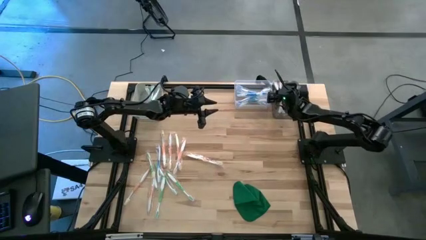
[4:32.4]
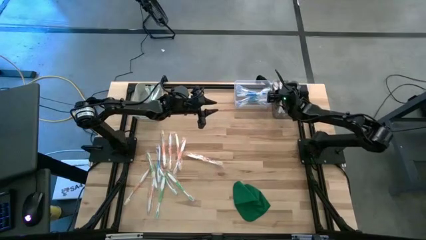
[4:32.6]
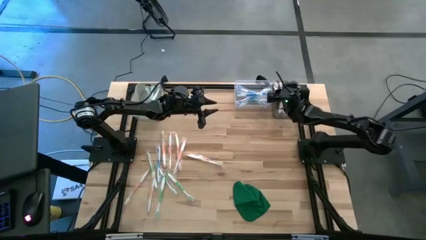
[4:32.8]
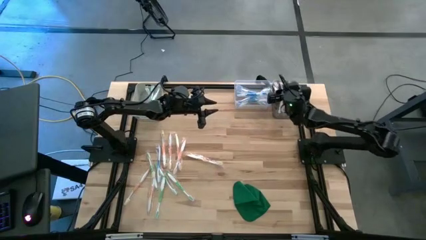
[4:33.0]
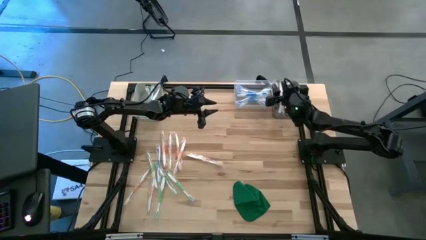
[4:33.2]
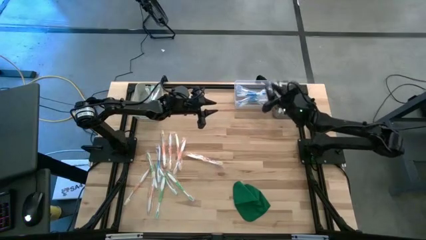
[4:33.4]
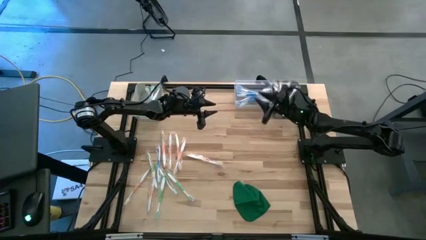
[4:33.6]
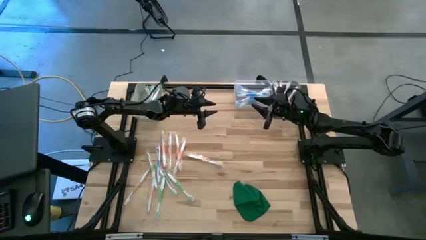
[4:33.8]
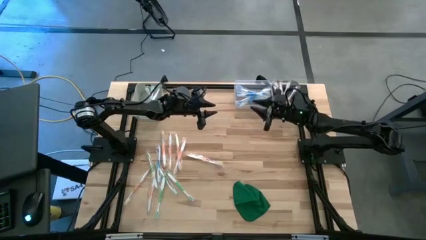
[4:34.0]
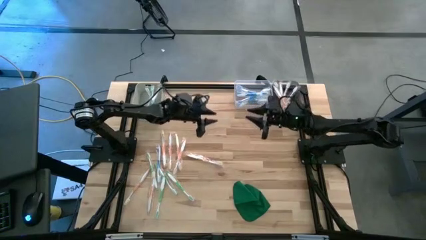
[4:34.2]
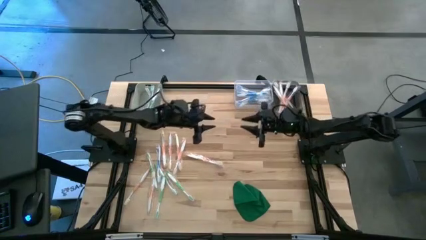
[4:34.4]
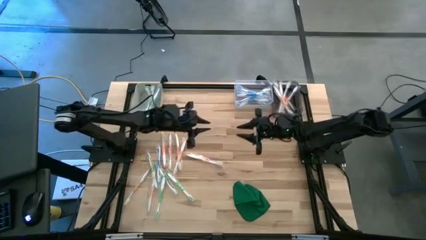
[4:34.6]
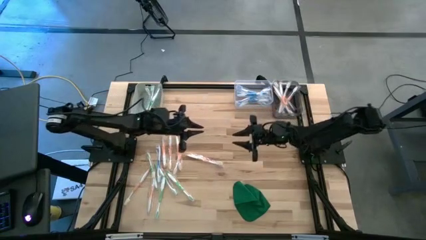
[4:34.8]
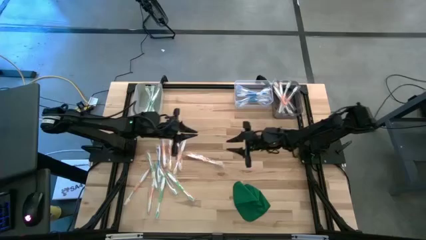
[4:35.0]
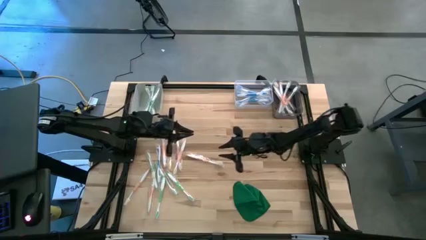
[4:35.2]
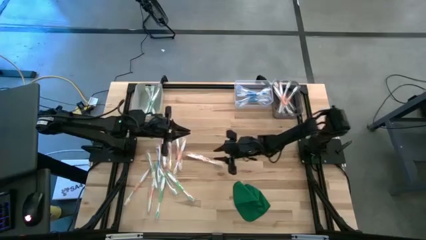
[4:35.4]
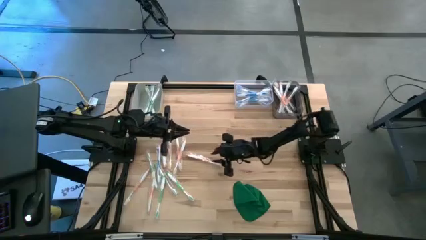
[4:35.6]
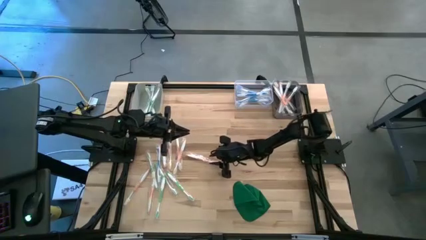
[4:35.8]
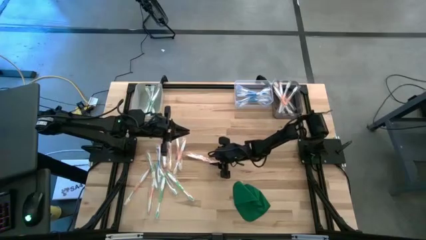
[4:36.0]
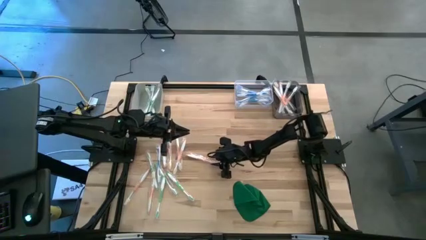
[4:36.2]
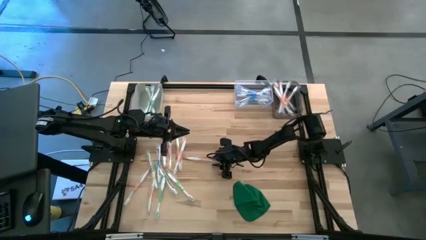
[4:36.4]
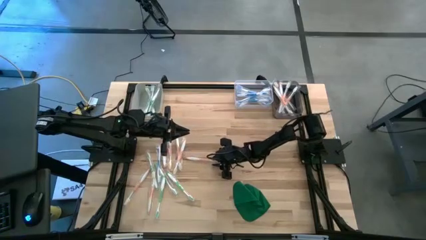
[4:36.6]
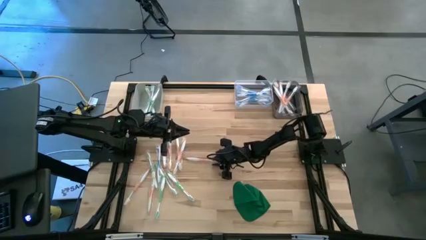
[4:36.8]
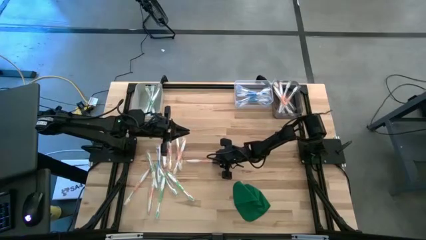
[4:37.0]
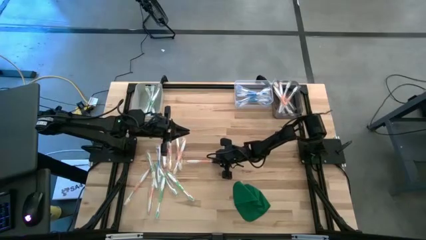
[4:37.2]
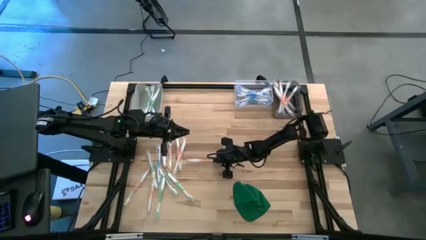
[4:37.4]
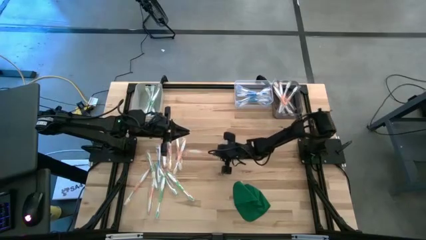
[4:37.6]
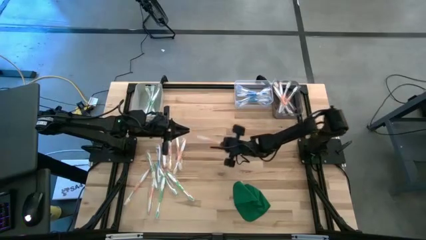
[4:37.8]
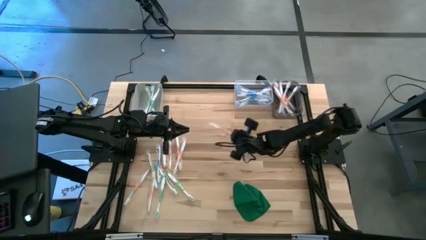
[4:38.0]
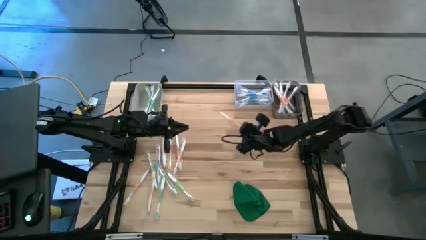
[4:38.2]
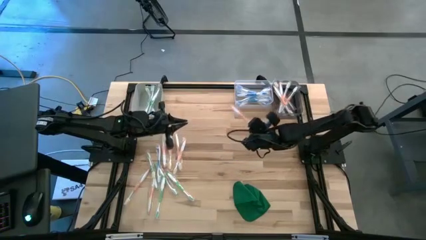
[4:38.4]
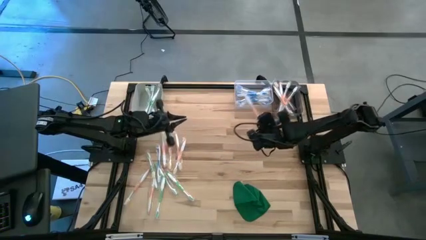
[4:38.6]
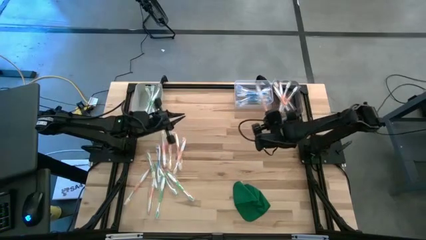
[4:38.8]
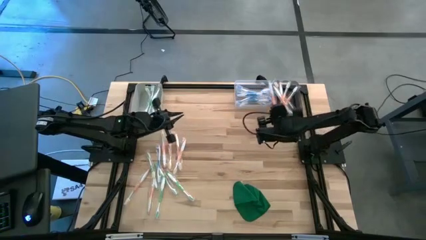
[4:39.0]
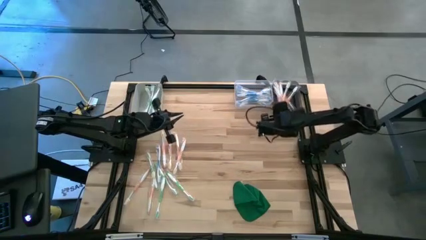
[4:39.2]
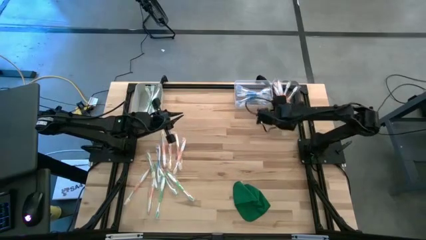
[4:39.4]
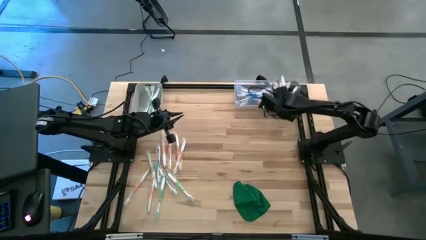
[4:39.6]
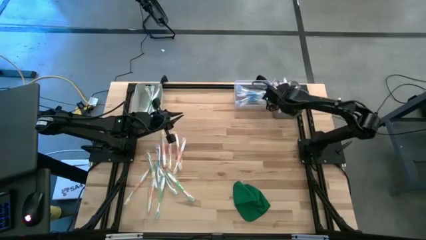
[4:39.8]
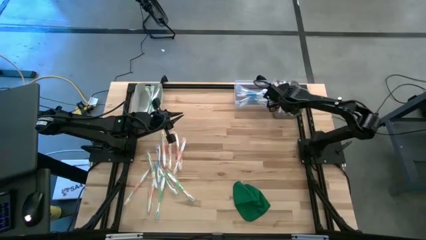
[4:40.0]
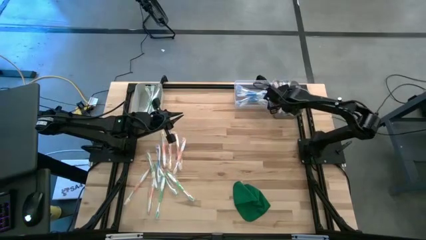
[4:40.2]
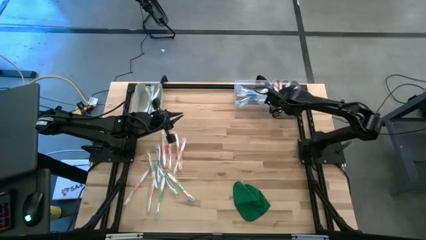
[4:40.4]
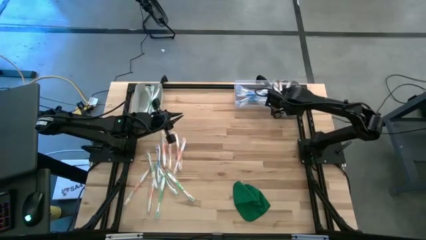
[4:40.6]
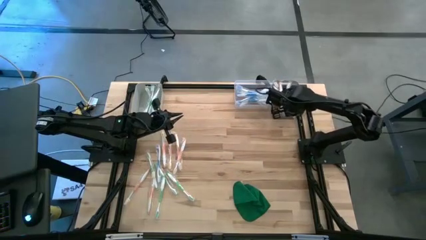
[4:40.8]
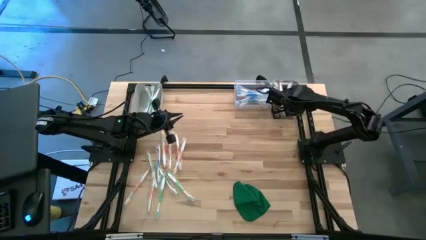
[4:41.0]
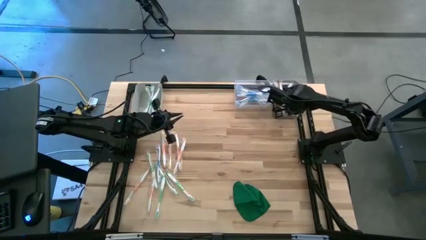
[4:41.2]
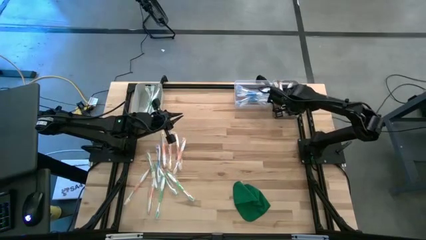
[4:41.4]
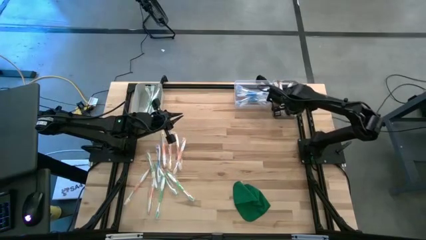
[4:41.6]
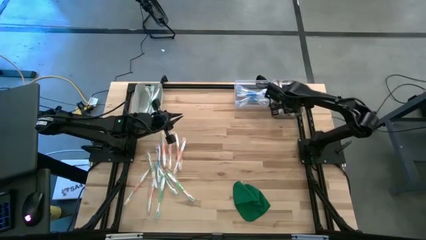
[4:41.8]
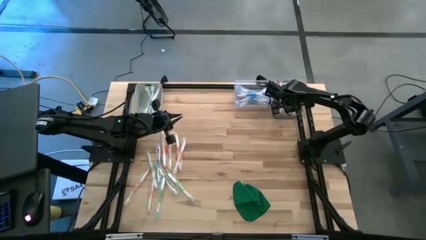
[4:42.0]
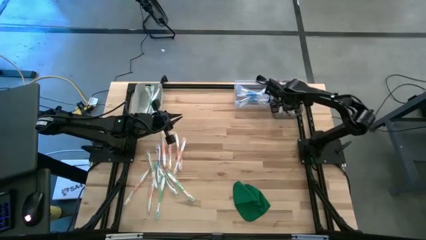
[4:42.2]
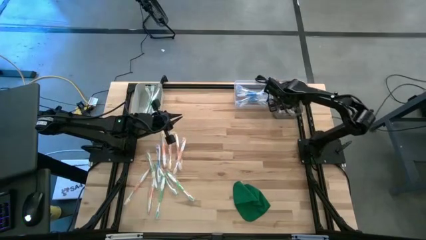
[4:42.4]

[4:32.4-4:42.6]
Task: Pick & Place Toothbrushes
Put the orange toothbrush into the black bin

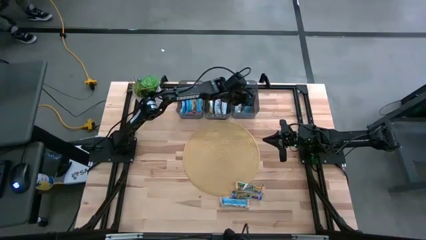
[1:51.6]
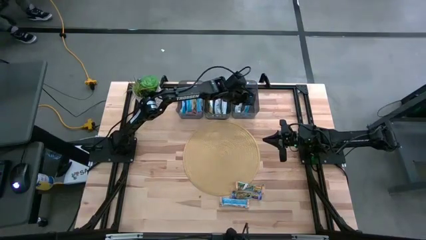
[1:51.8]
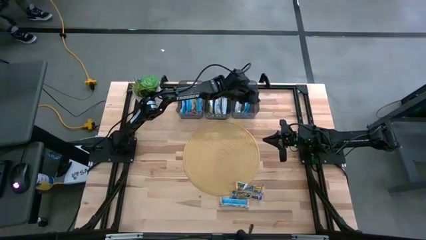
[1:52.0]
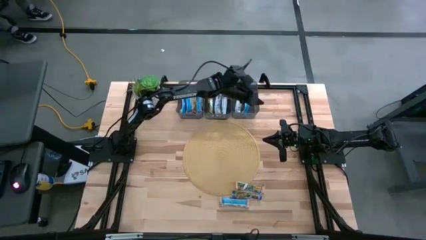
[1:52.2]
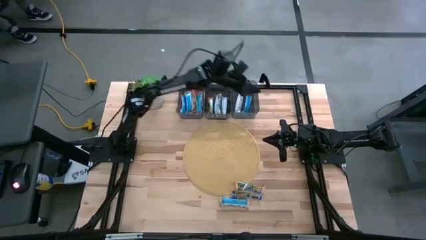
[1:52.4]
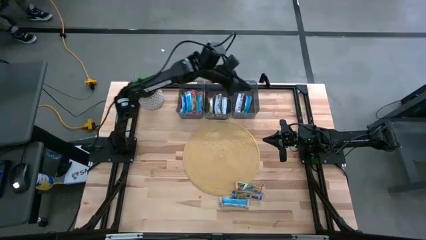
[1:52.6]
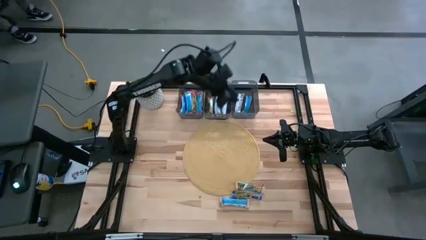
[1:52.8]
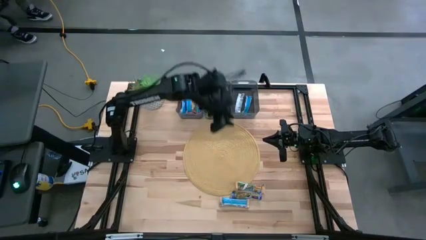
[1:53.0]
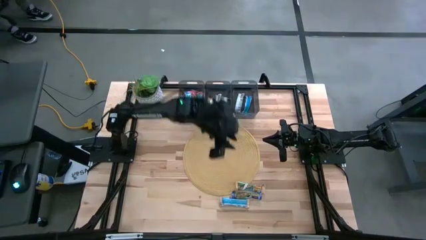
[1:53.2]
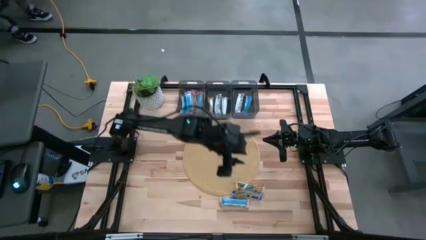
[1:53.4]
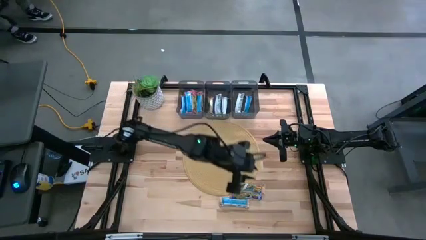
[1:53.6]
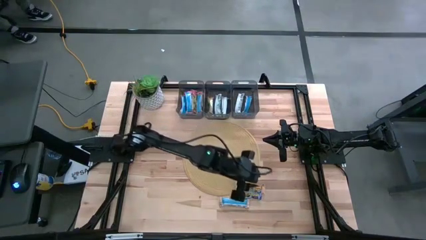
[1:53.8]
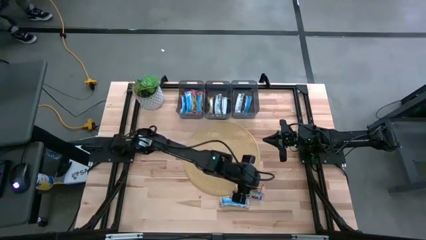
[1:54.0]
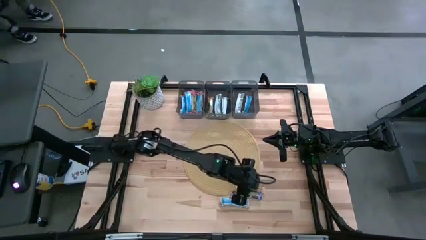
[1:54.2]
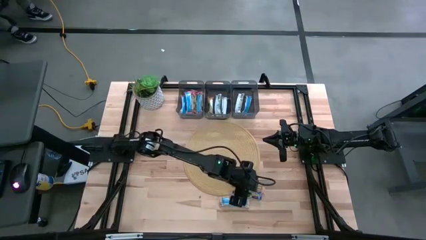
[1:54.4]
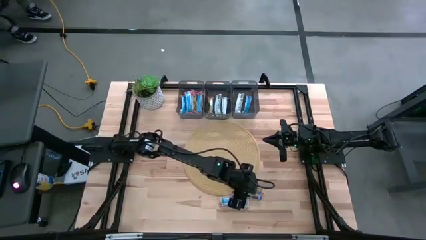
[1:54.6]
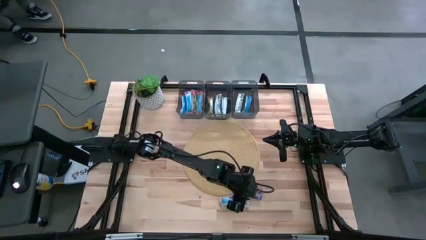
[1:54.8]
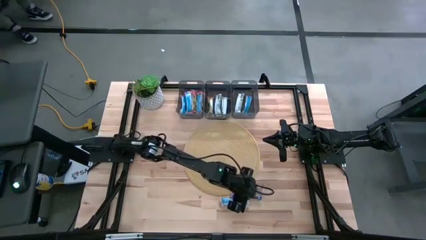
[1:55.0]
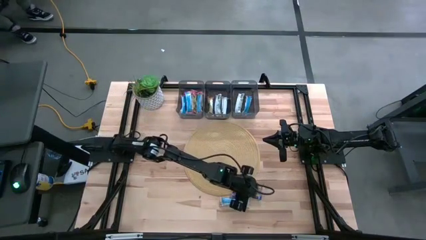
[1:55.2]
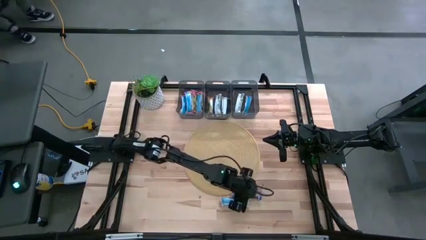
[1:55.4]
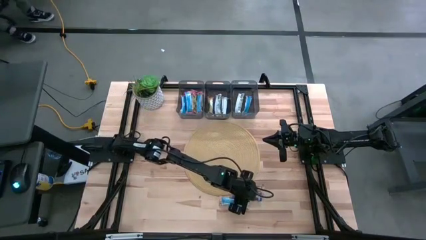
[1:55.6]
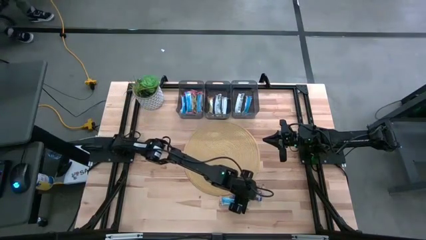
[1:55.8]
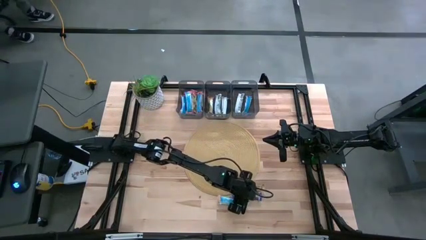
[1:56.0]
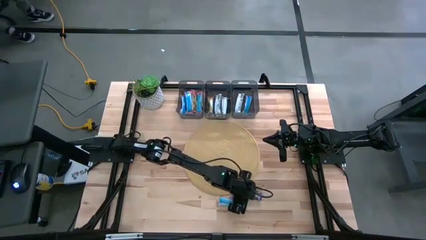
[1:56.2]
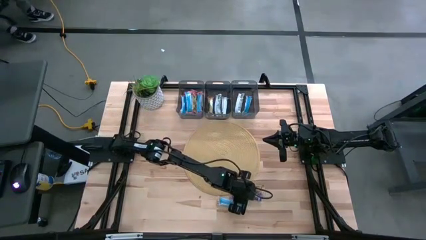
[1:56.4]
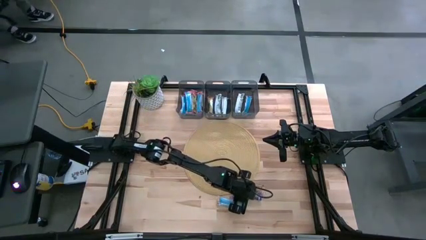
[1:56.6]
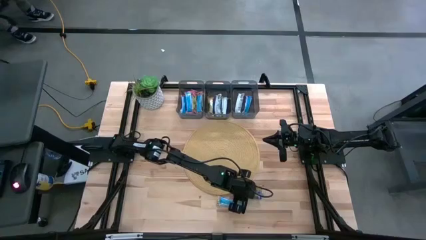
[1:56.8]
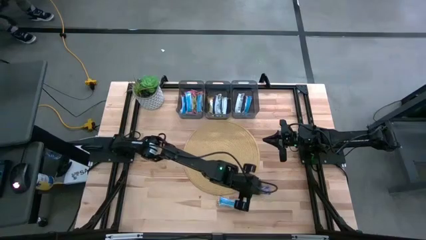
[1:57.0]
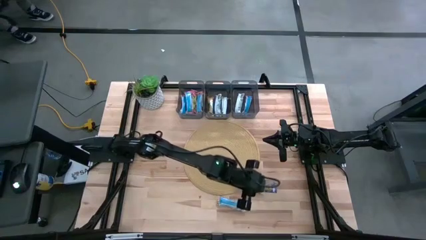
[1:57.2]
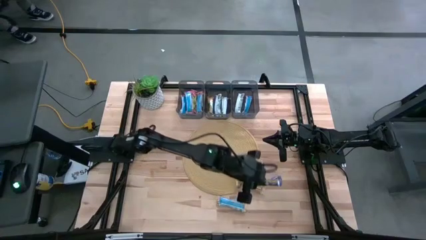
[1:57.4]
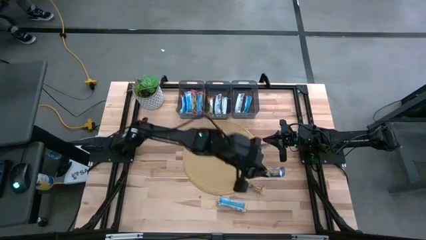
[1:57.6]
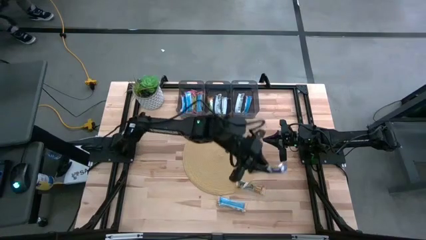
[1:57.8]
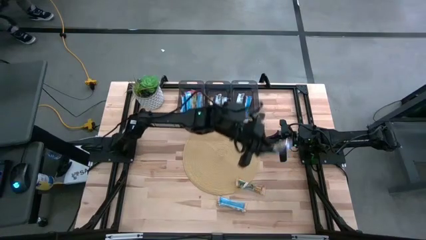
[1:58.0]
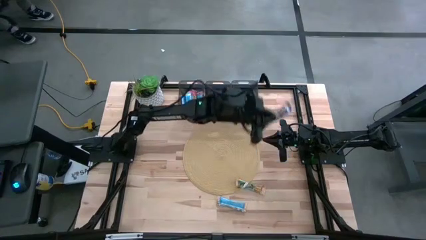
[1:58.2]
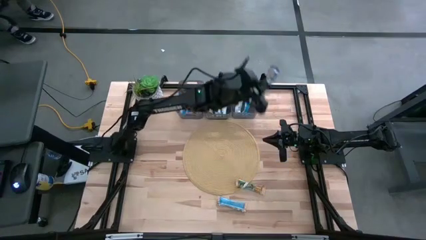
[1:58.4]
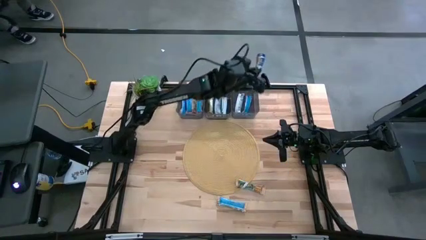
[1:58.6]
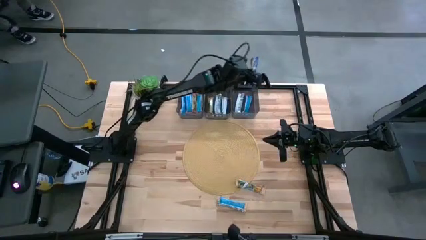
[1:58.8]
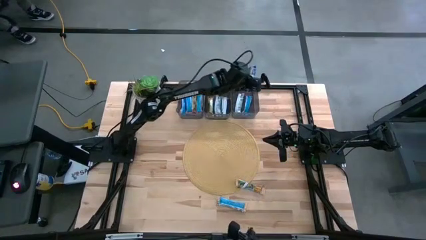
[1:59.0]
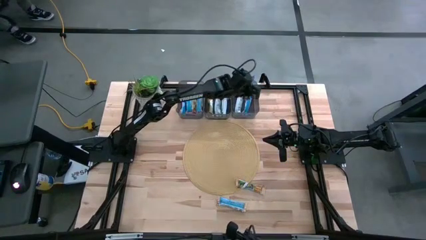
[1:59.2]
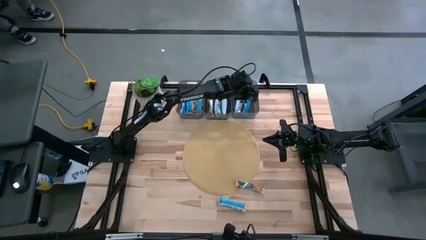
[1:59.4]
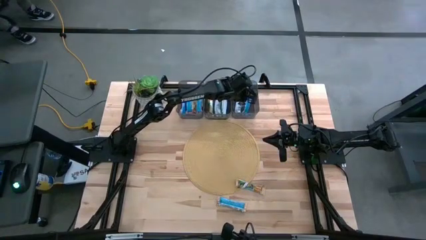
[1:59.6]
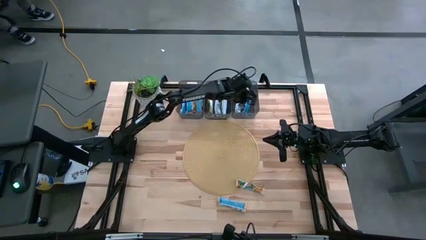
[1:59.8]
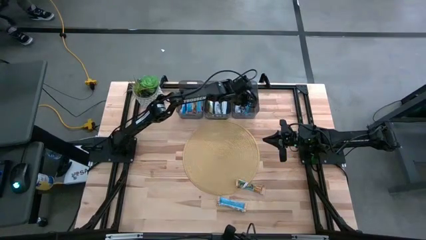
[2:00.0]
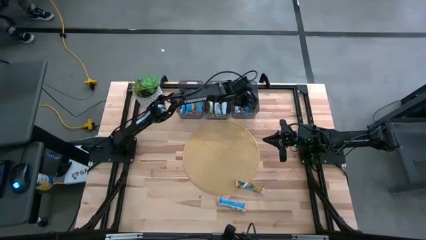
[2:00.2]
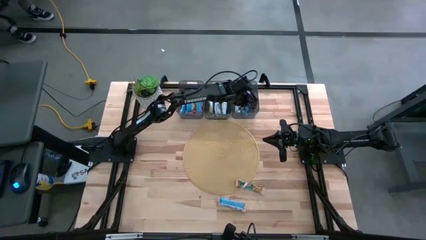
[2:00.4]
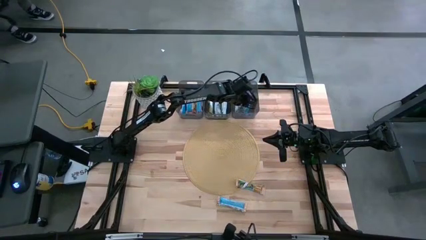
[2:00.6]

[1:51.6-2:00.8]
Task: Pick and place Granola Bars by type
Put the blue granola bar into the right black bin
